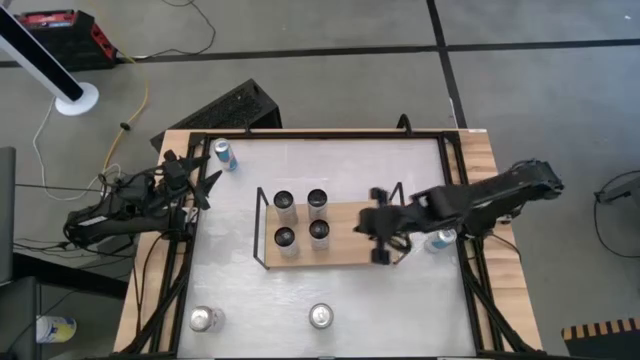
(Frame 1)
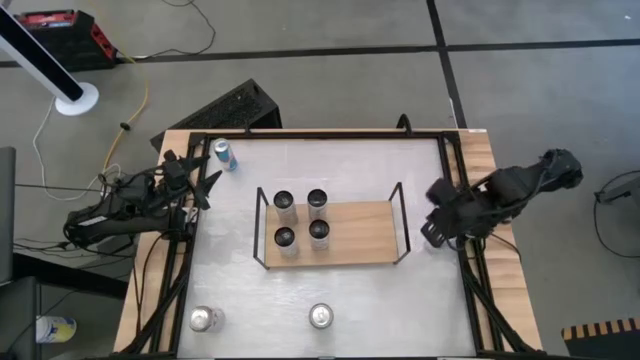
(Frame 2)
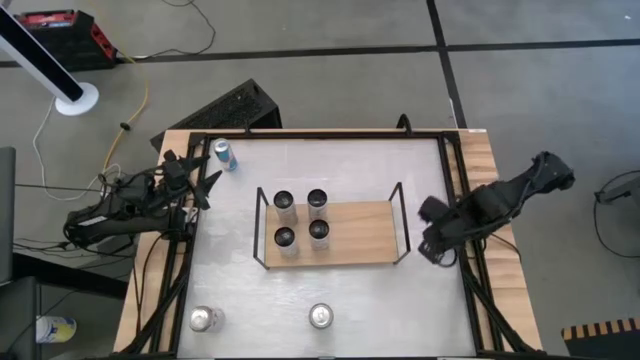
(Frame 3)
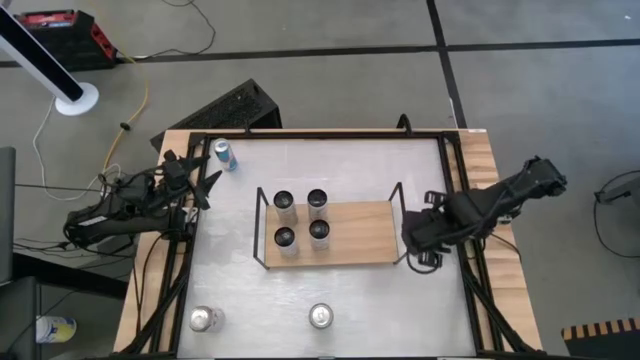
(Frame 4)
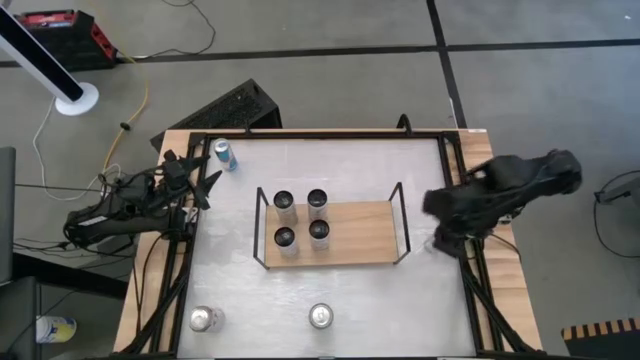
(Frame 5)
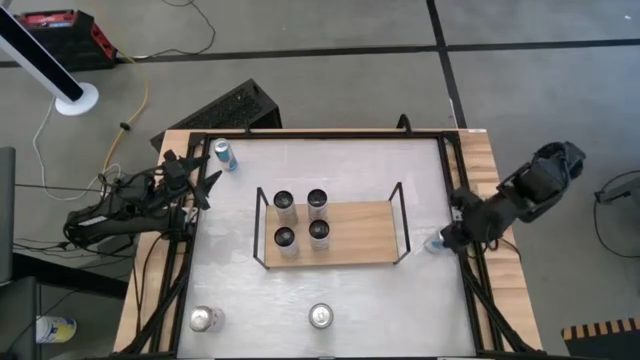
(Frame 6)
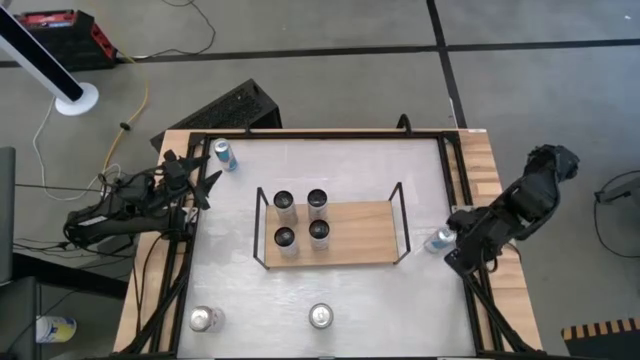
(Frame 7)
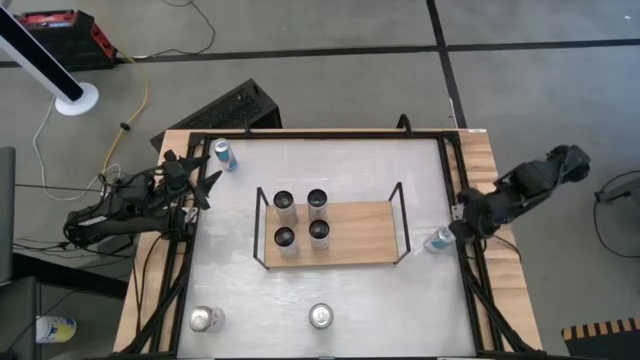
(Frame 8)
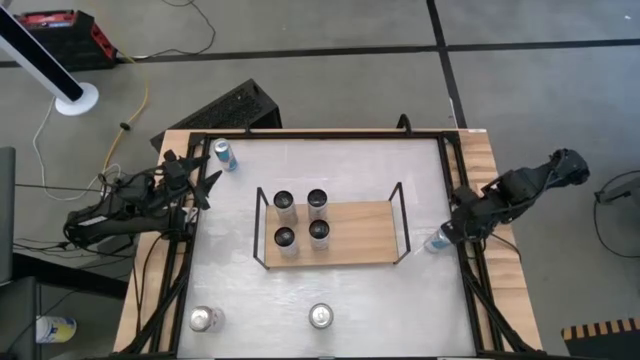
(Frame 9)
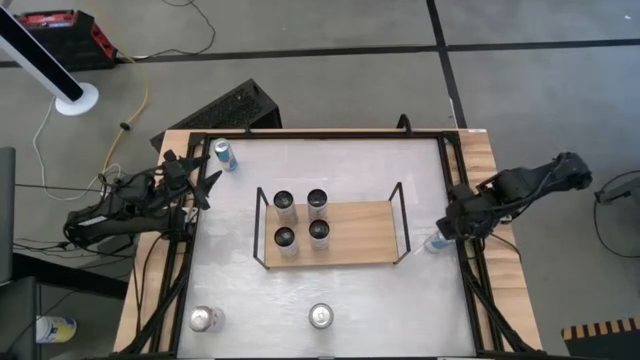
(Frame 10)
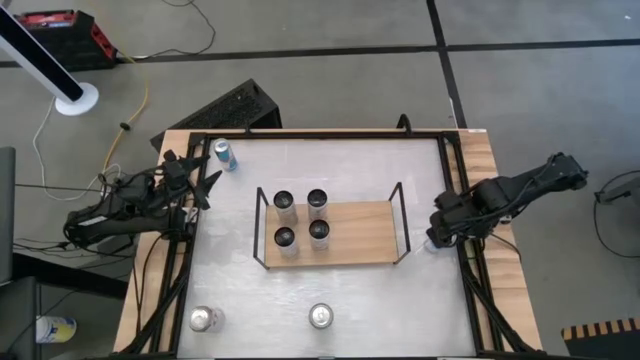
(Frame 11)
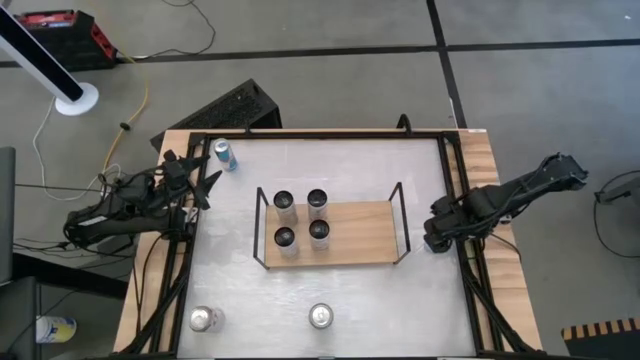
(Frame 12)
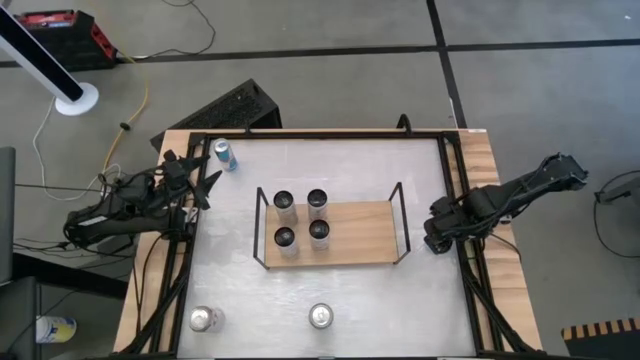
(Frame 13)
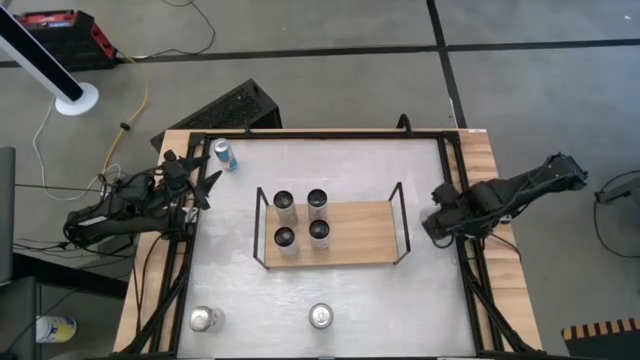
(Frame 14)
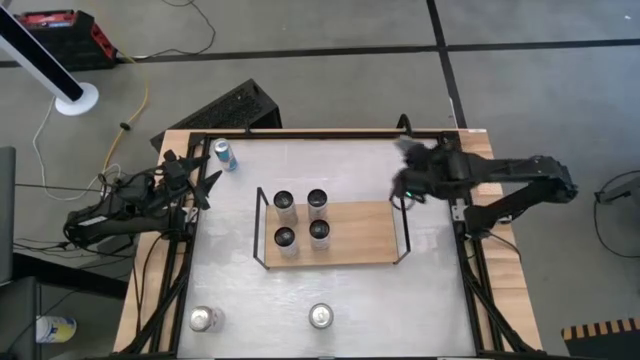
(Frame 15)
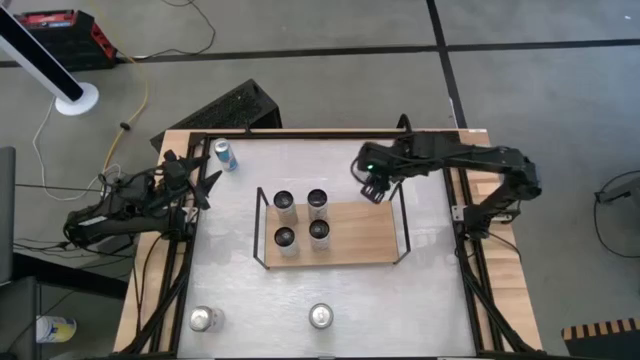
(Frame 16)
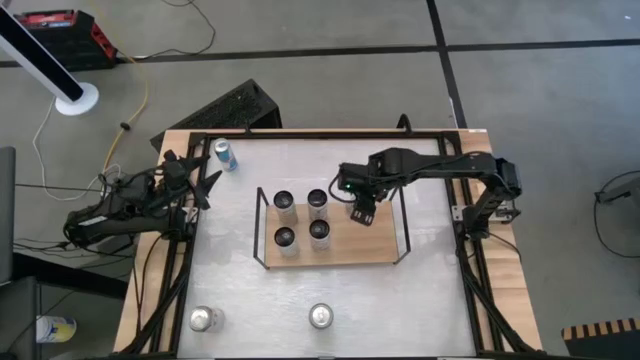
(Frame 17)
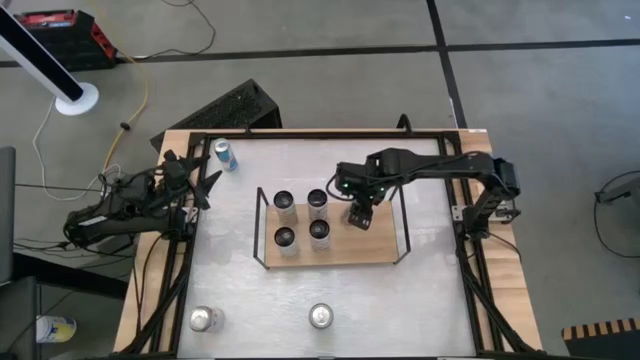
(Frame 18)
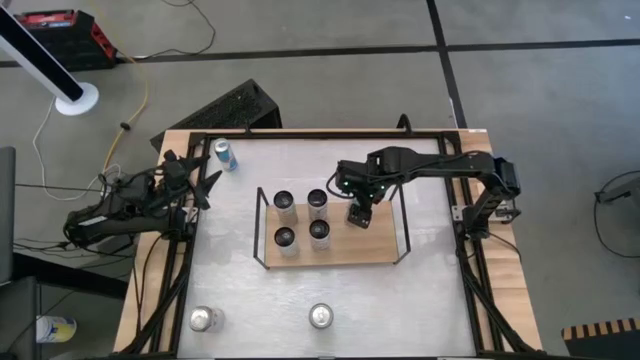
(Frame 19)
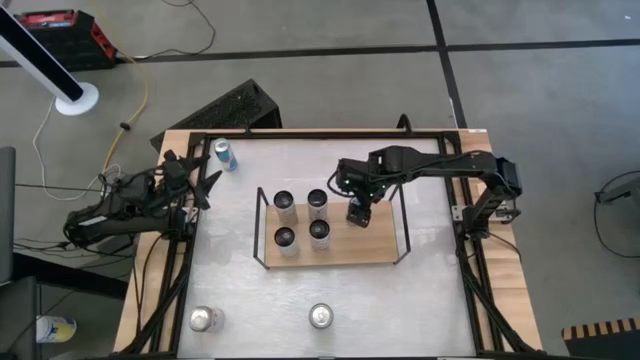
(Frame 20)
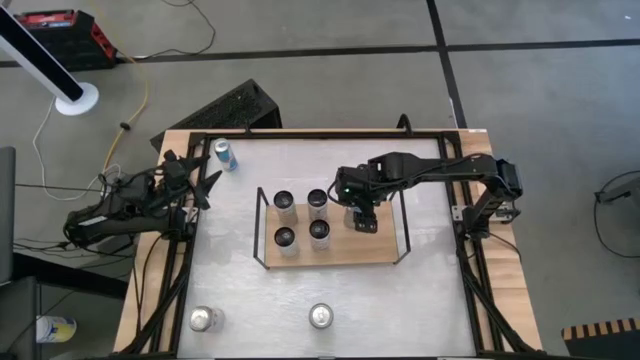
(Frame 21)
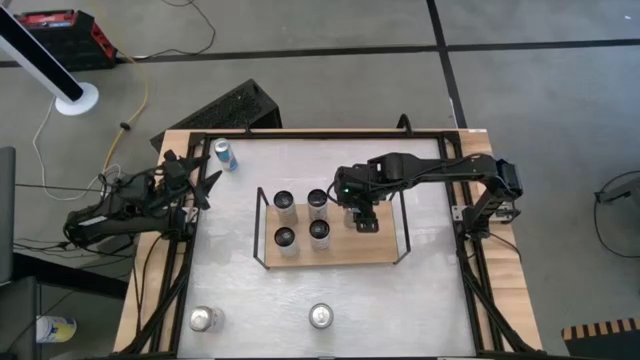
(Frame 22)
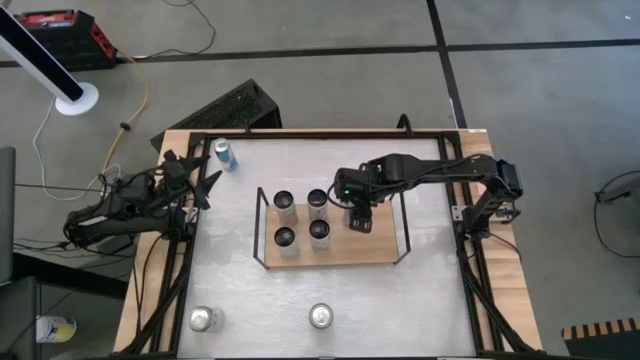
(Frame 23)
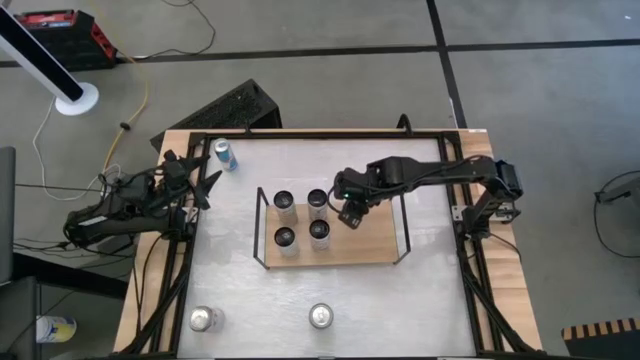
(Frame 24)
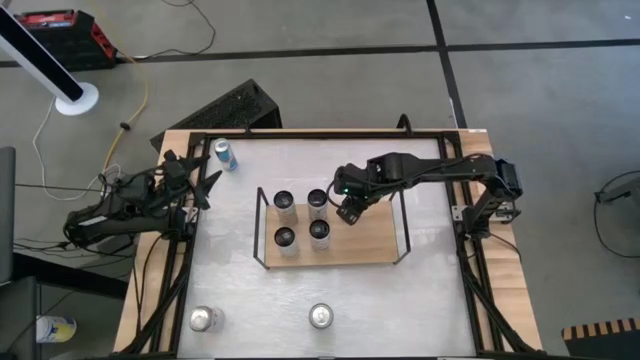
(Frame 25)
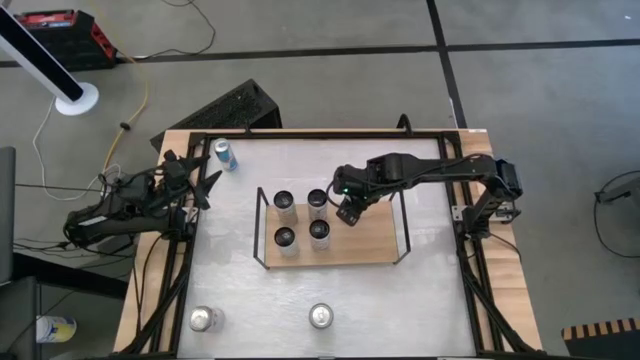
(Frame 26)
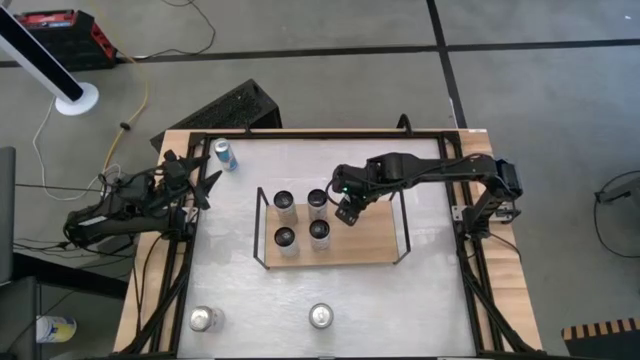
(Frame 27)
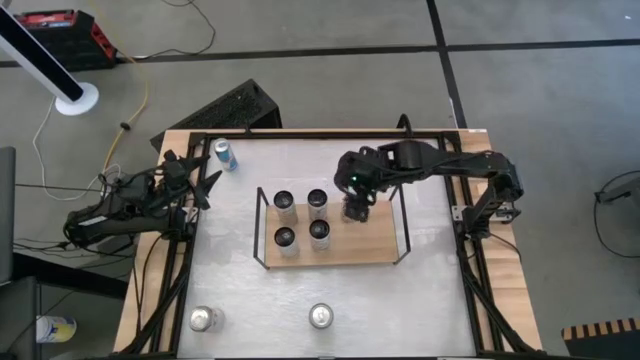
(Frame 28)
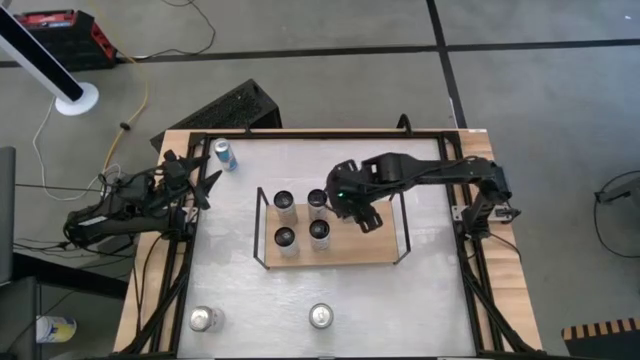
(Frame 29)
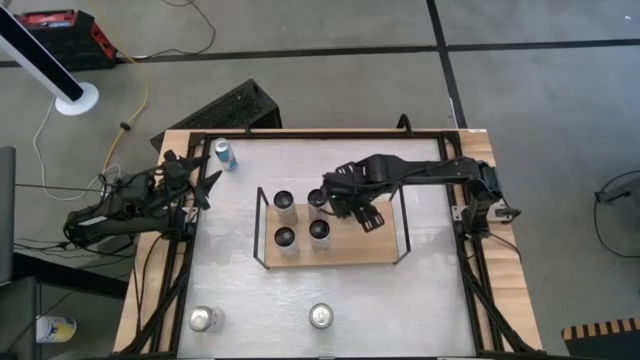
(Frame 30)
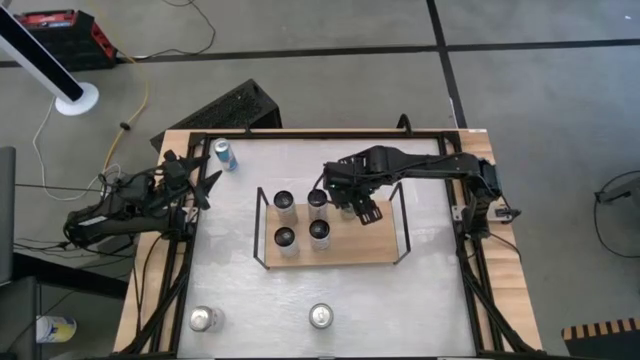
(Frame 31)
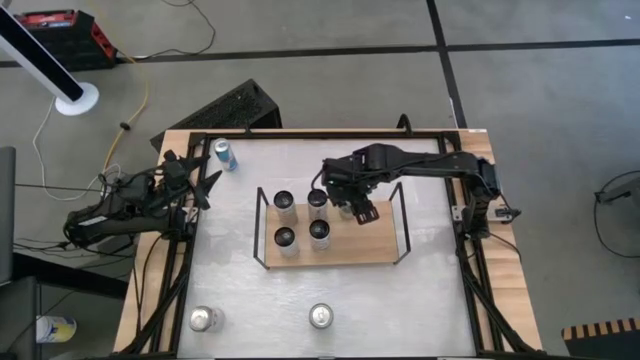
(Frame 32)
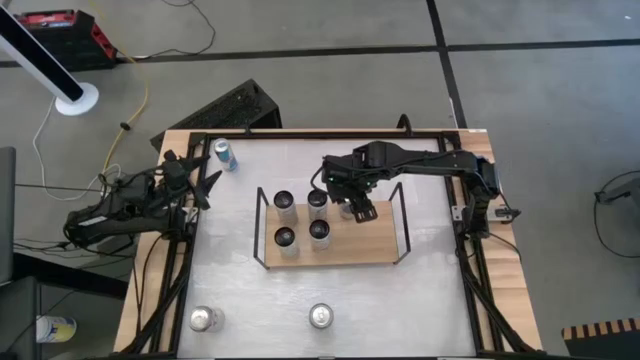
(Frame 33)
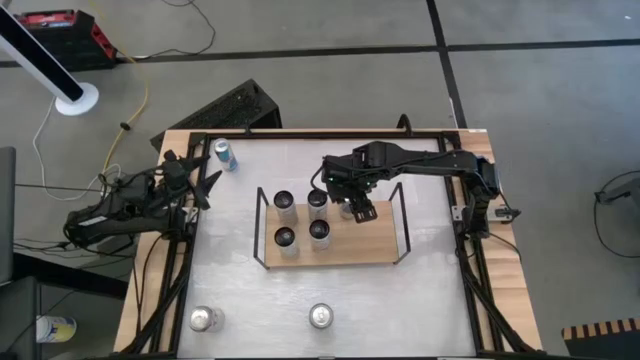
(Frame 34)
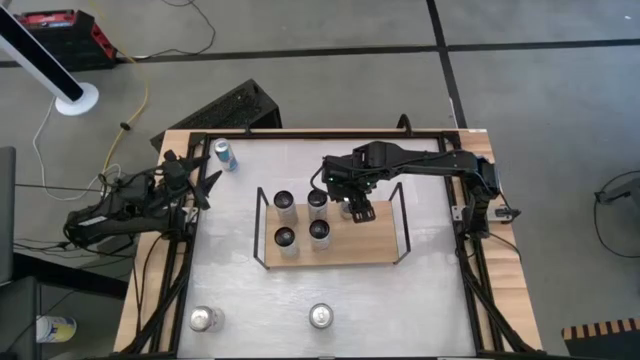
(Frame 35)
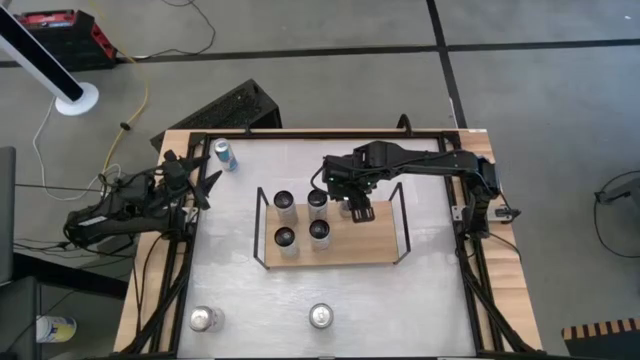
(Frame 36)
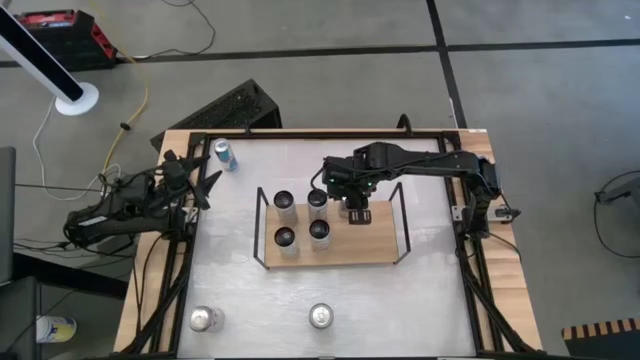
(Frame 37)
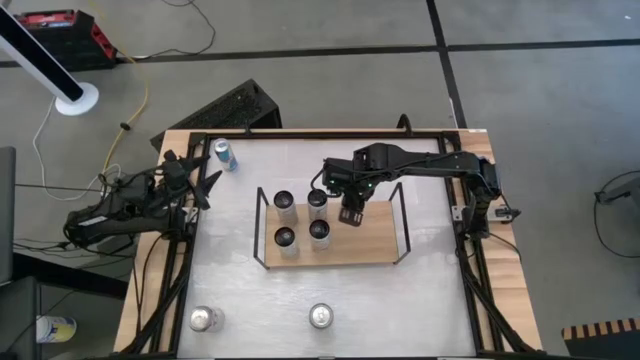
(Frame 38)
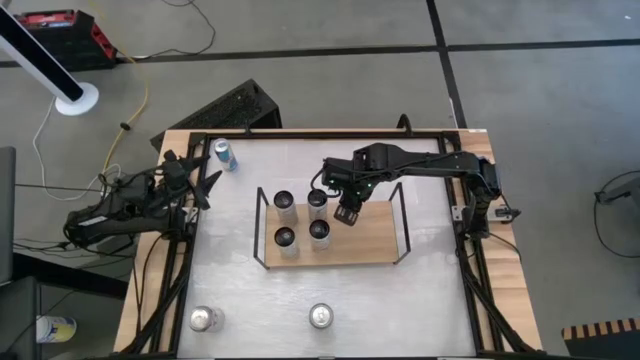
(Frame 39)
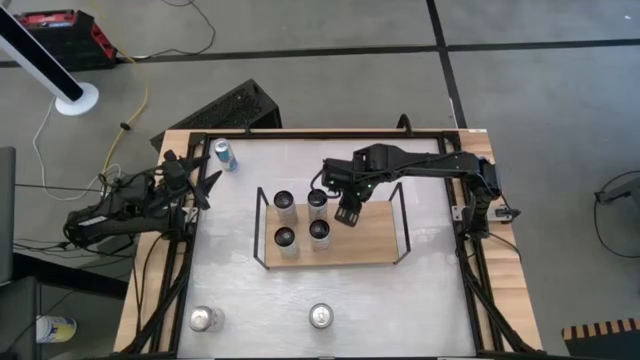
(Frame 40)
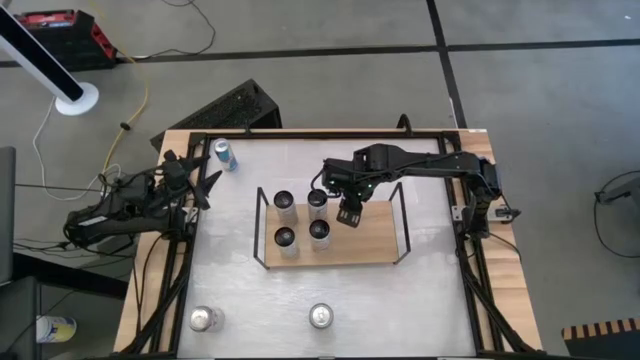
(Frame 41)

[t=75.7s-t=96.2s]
Task: Place canned beverage on shelf
Put the right blue soda can on the shelf
